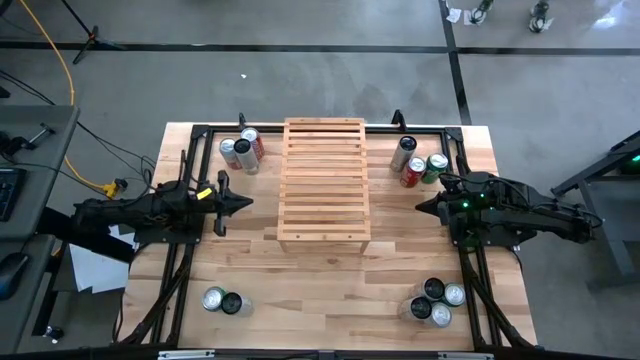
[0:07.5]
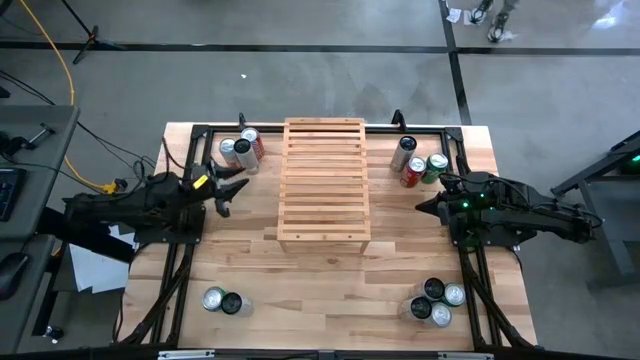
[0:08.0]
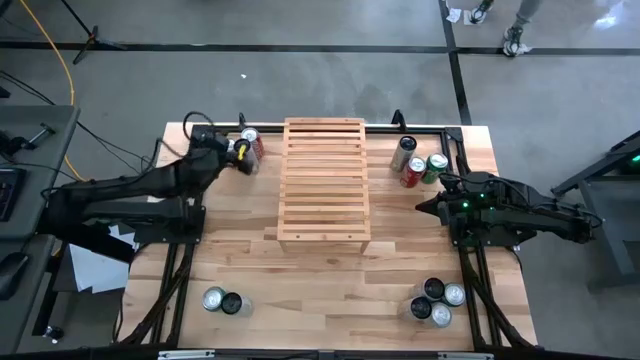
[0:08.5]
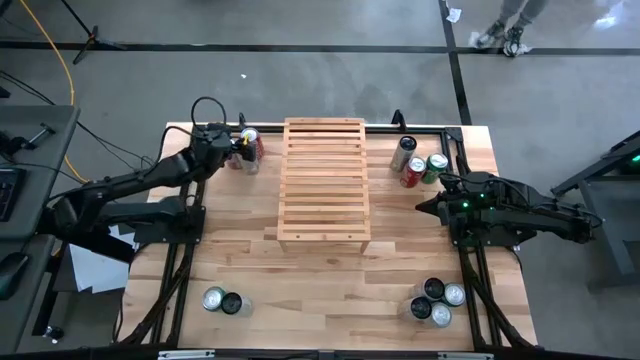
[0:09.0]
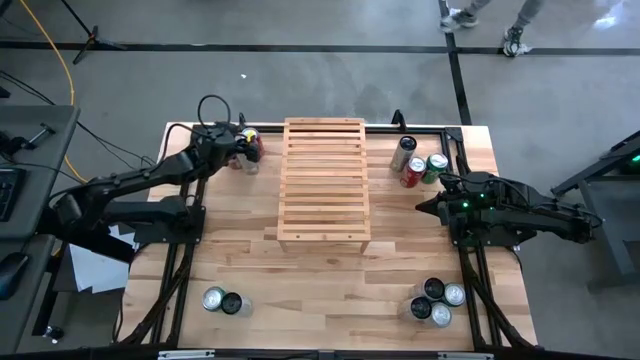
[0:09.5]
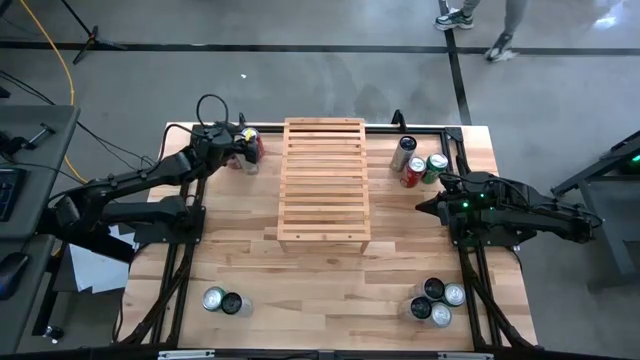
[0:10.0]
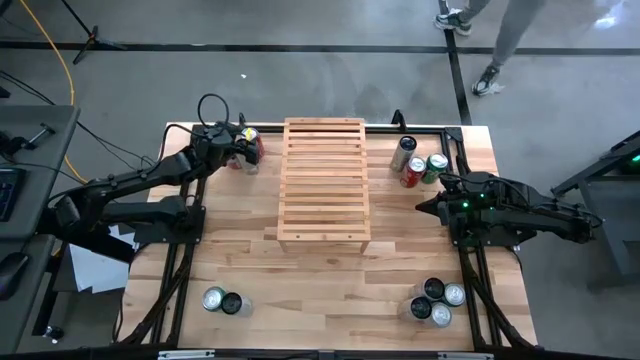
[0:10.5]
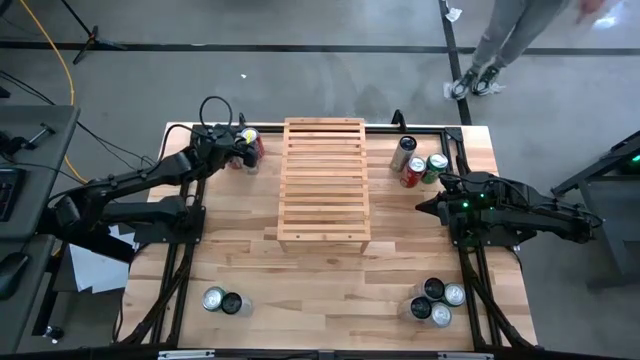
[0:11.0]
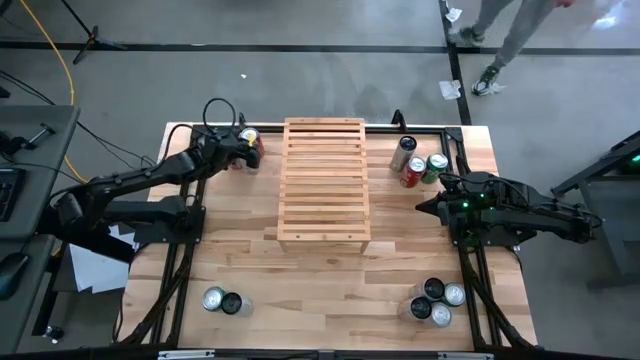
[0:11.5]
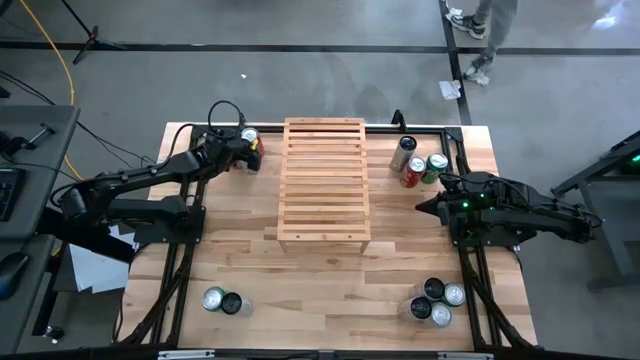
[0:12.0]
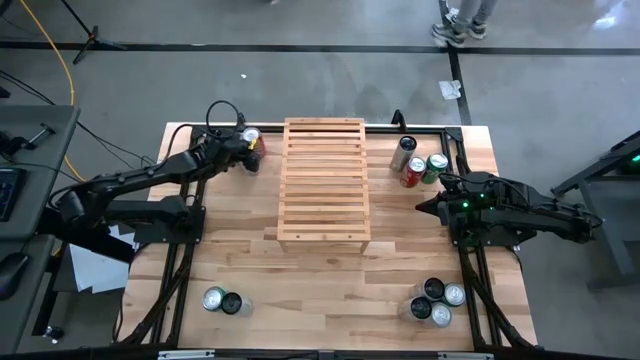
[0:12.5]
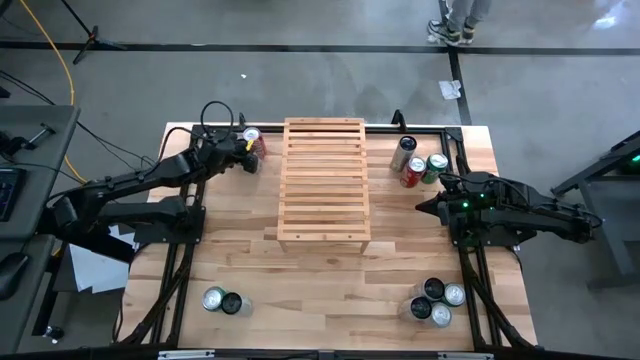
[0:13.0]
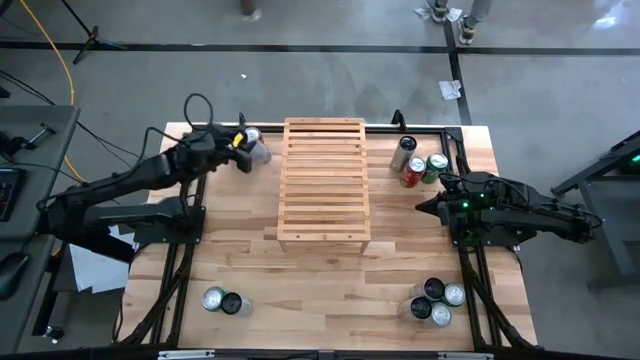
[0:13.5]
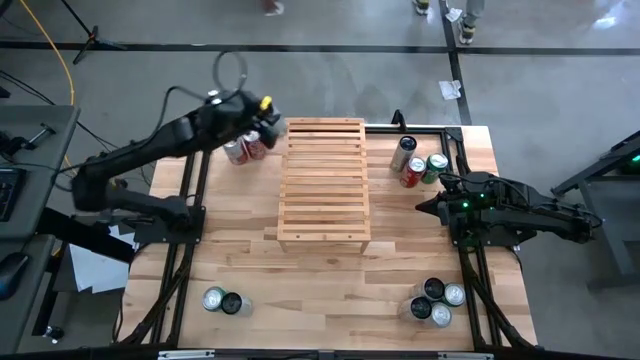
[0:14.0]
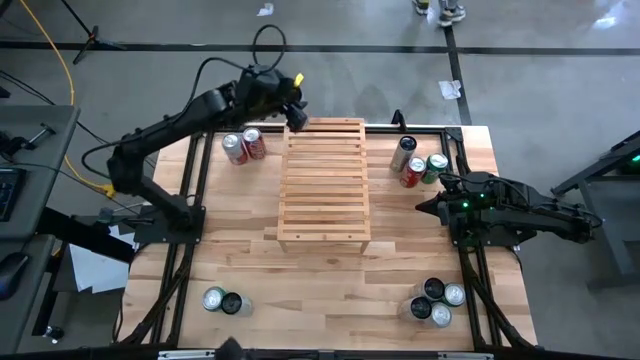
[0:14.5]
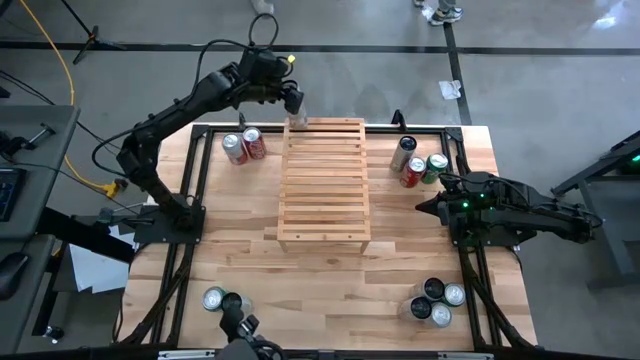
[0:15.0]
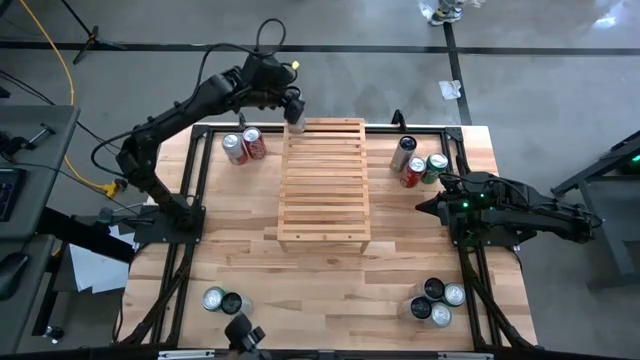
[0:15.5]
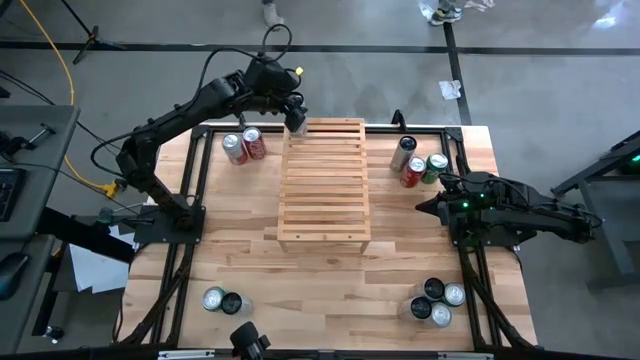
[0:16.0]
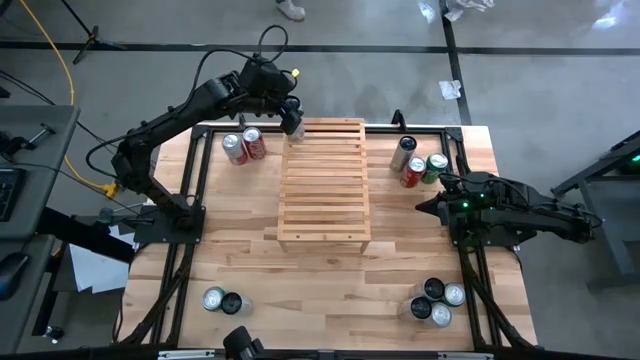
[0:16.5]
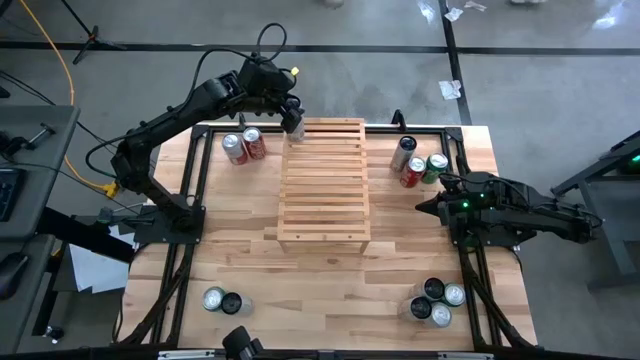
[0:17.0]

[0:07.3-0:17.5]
Task: Place canned beverage on shelf
Put the left white yellow soda can on the shelf

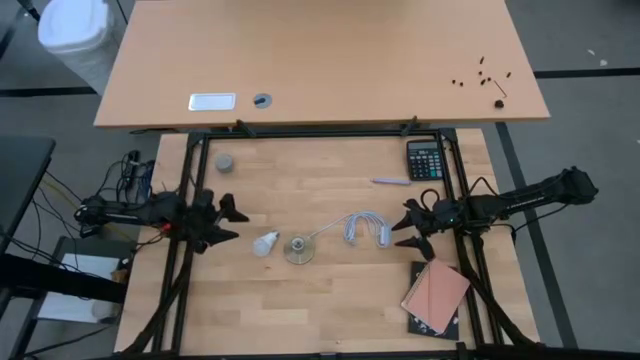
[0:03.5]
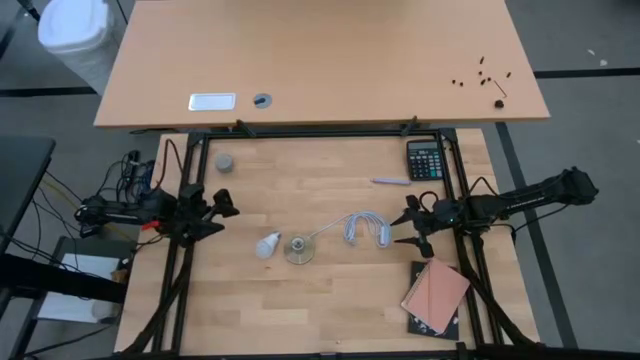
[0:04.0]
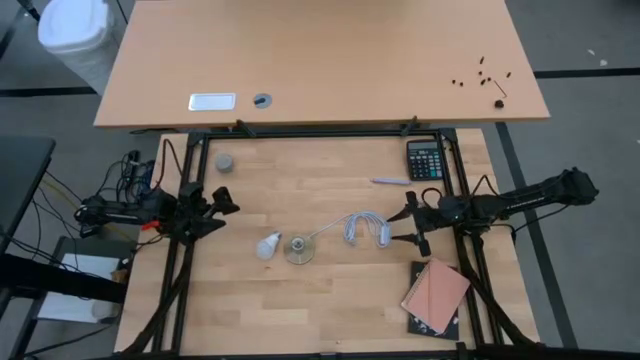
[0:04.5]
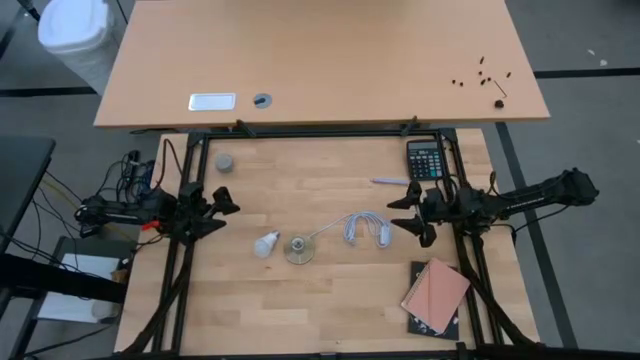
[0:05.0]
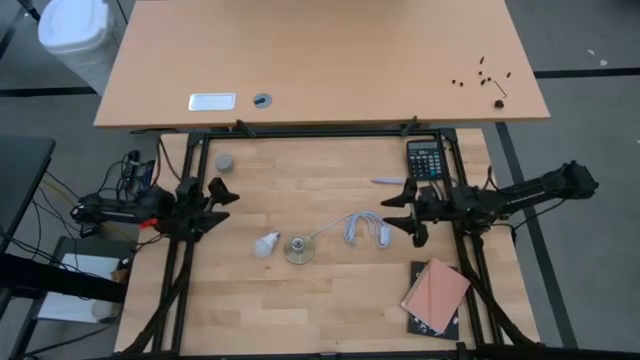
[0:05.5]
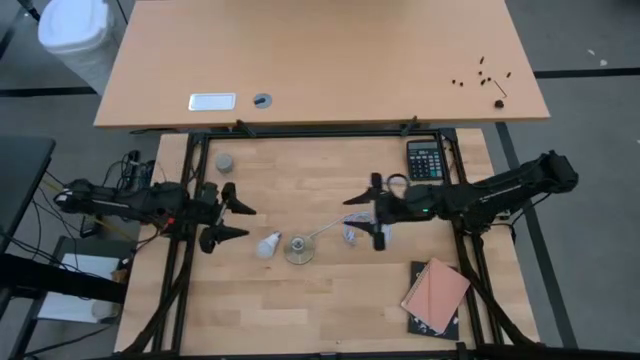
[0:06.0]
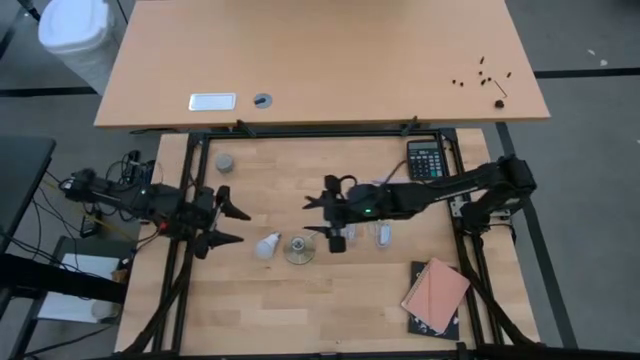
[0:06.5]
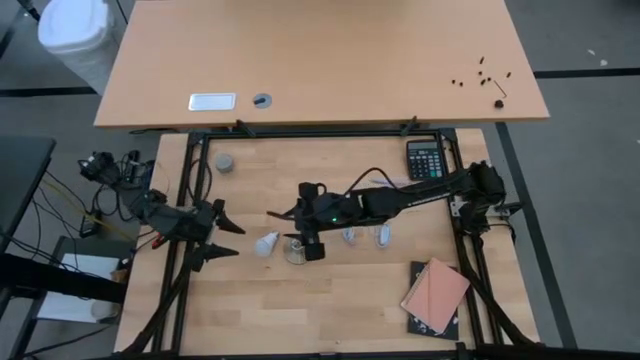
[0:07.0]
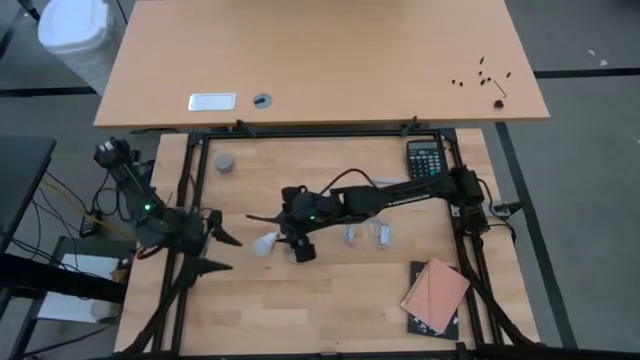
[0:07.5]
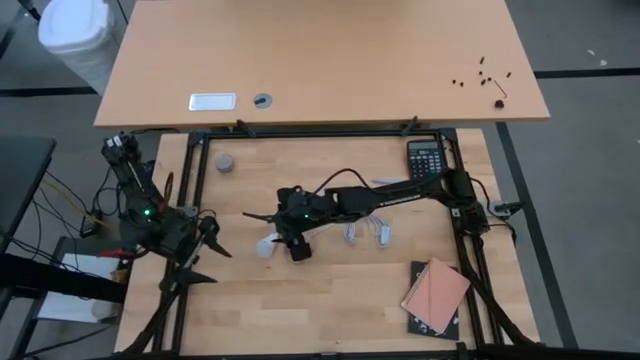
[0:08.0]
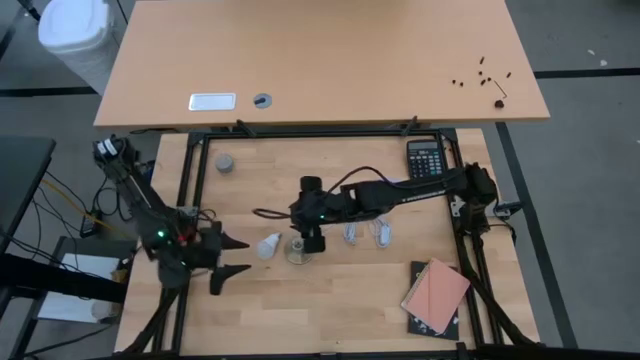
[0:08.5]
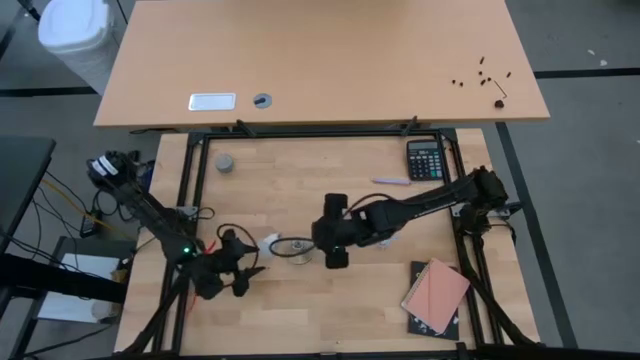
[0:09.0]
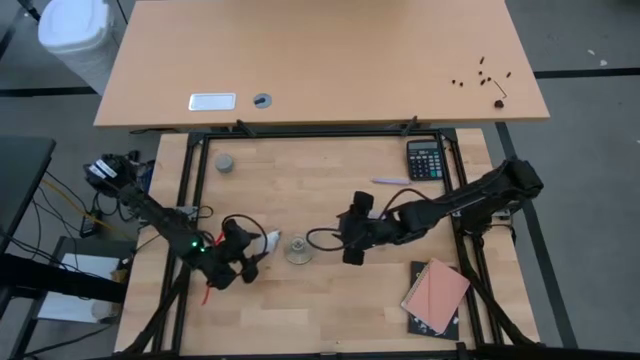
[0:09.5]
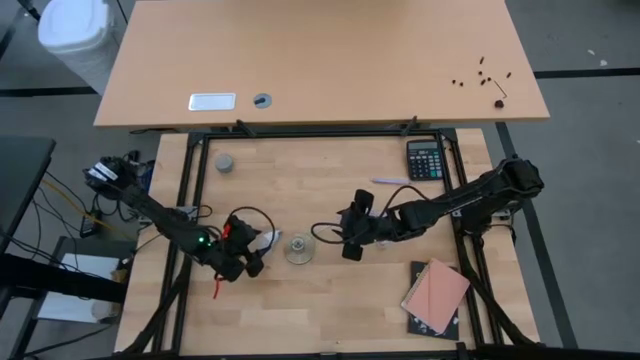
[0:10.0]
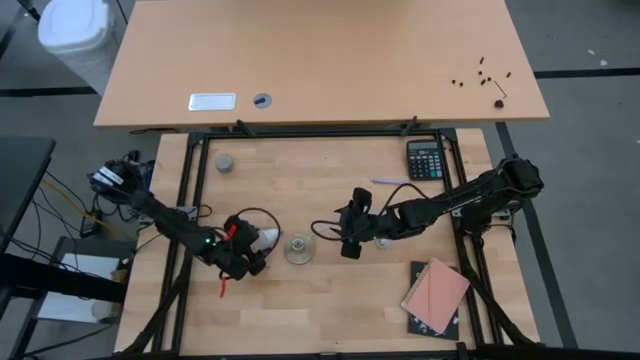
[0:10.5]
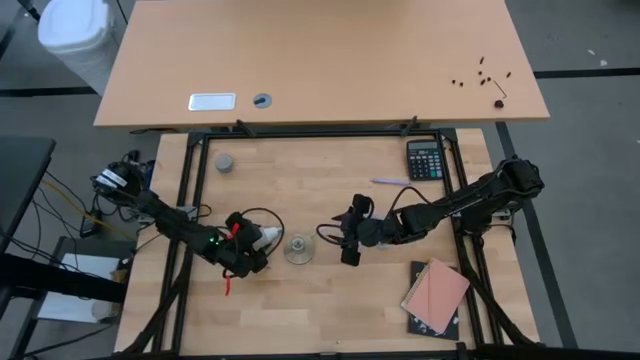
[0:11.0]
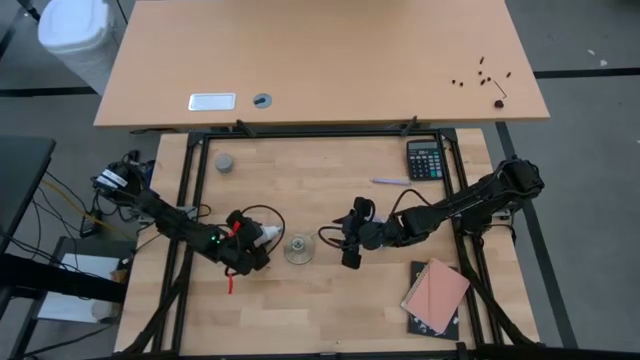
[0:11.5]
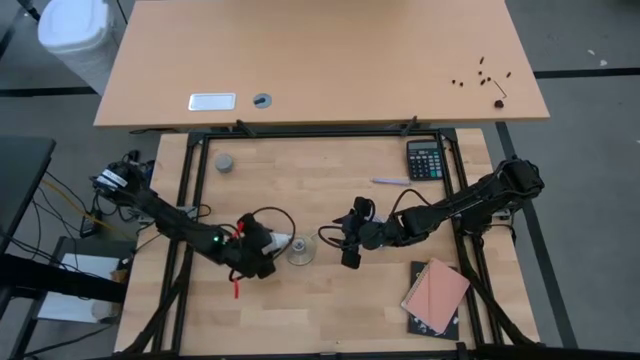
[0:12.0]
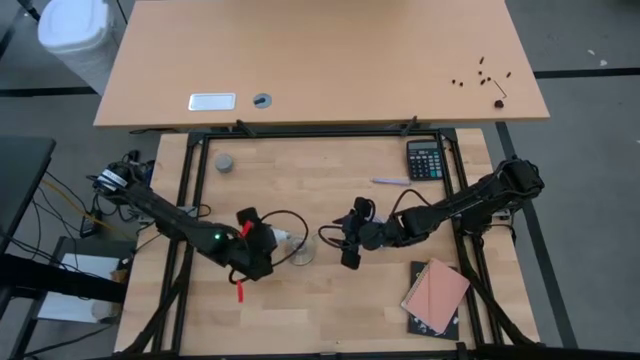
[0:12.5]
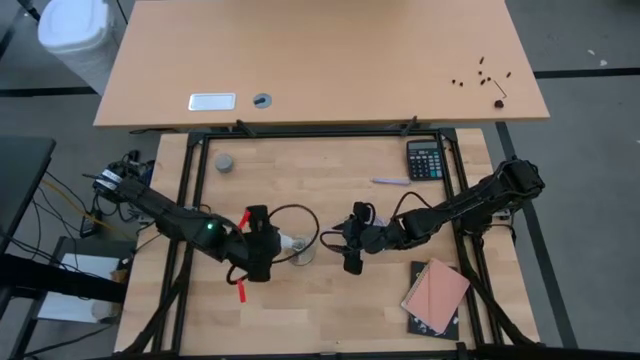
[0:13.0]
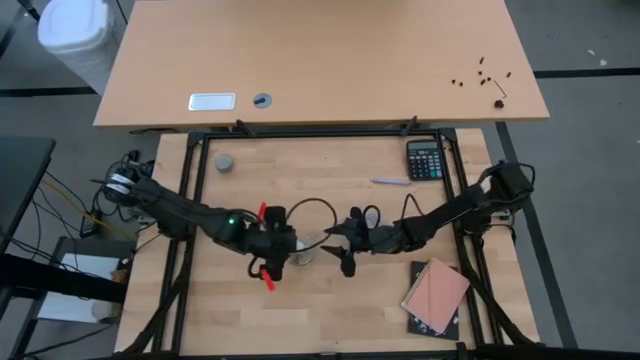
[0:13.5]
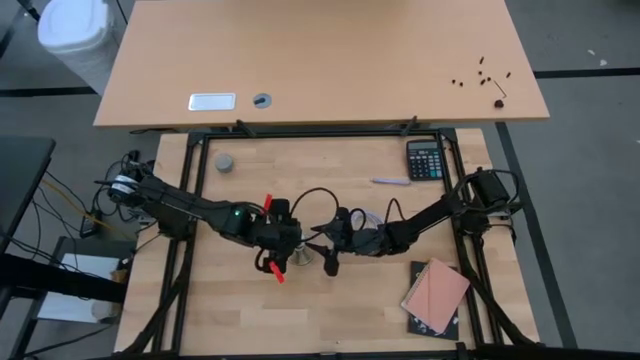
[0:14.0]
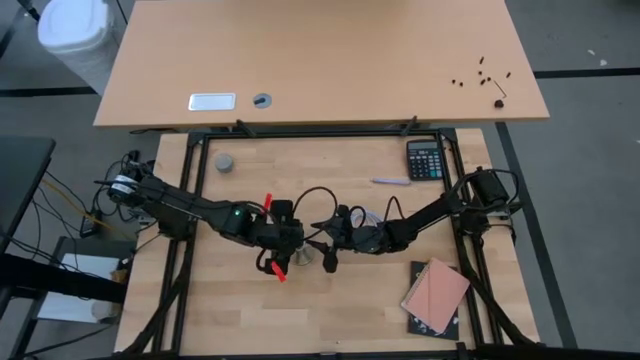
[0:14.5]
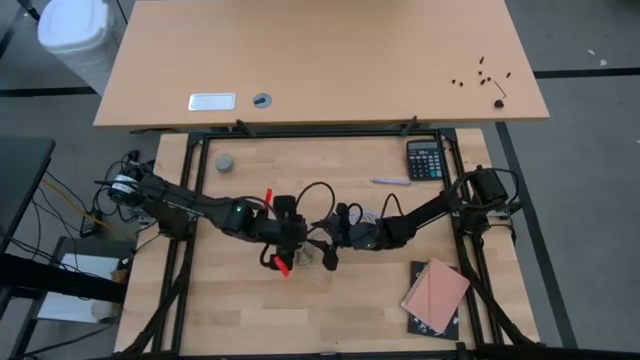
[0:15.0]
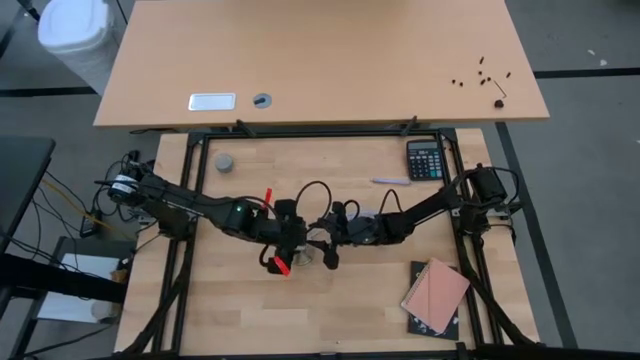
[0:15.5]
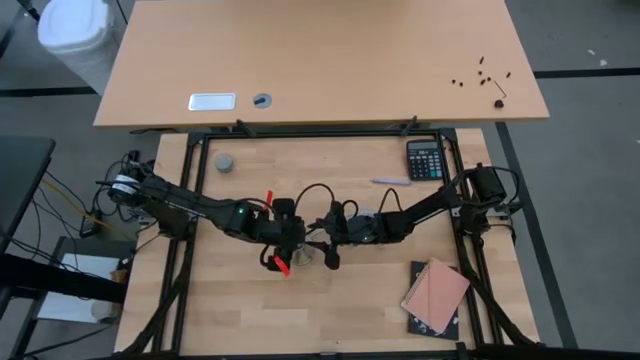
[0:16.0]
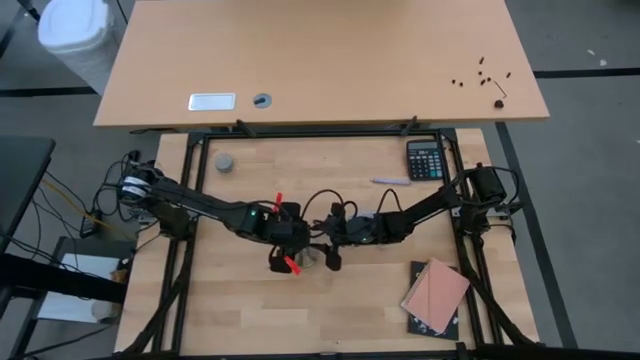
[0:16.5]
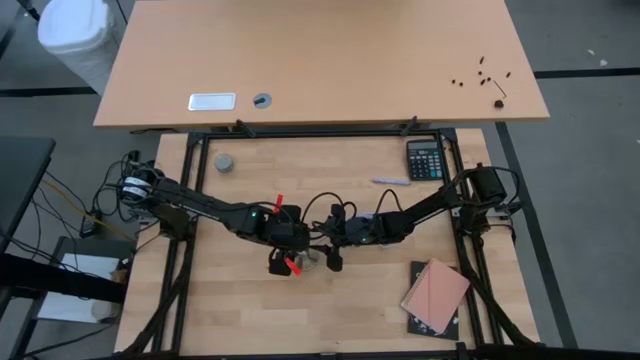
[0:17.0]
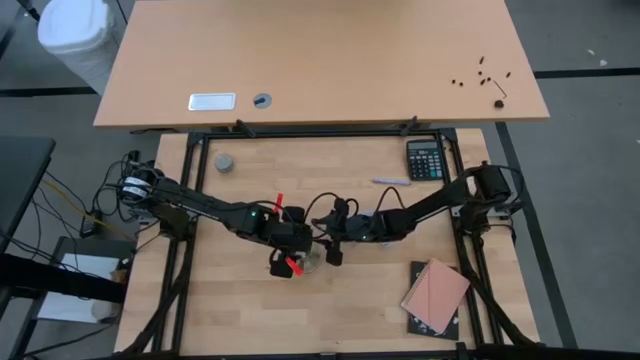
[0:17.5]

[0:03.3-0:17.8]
Task: Screw lightbulb
Insert the lightbulb into the bronze lamp socket
